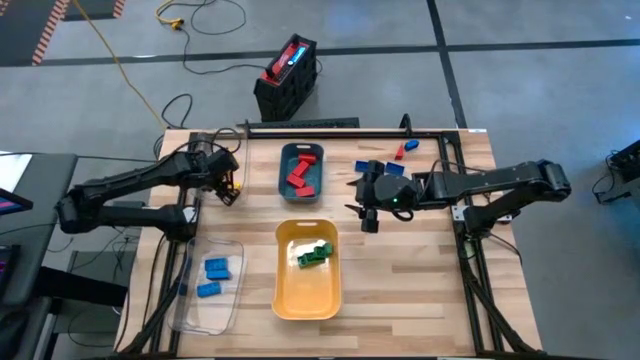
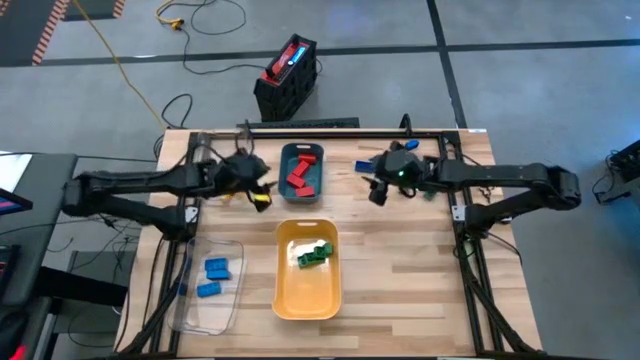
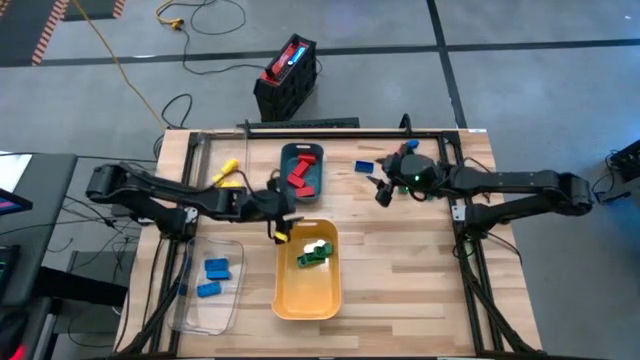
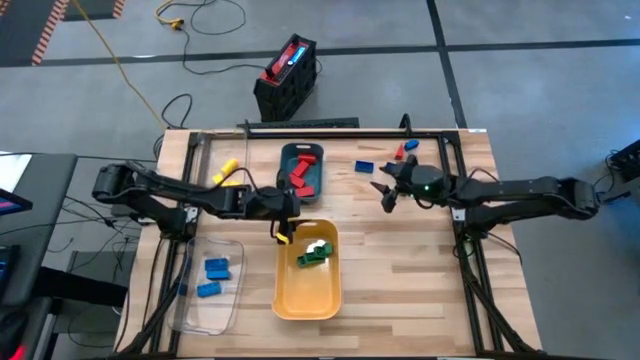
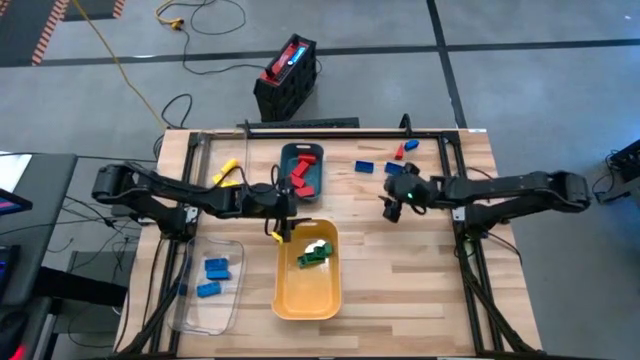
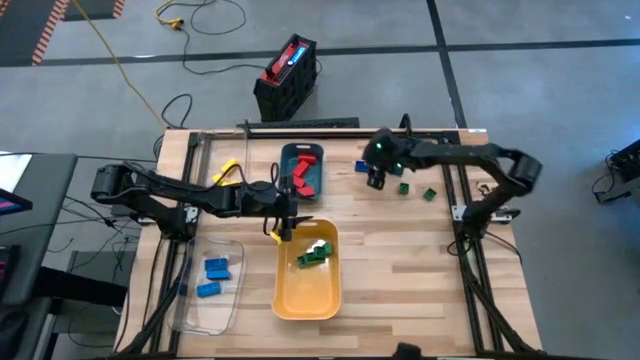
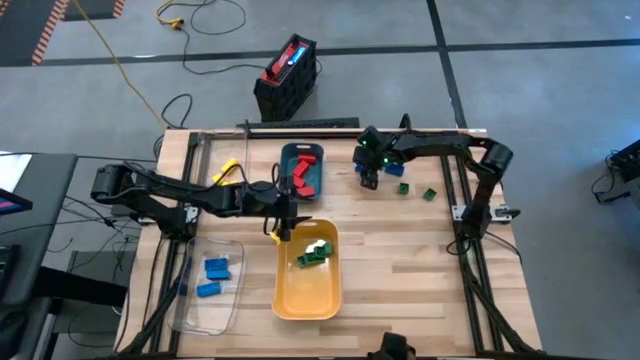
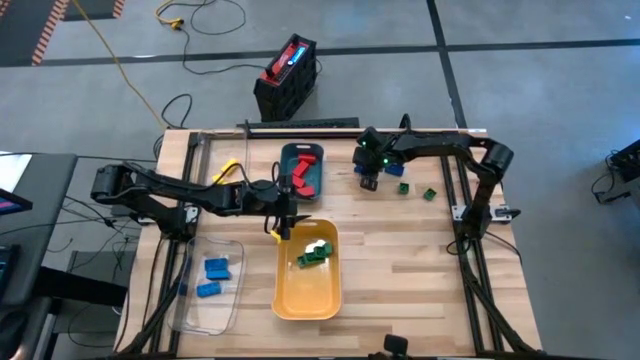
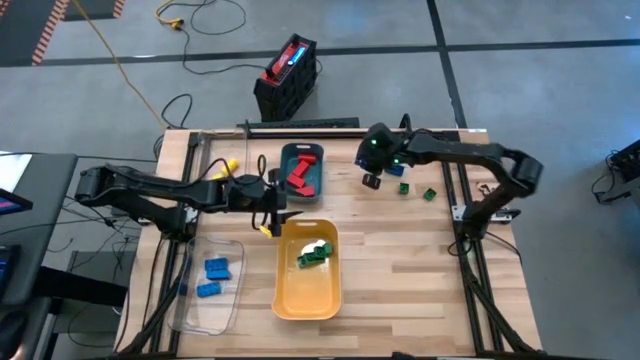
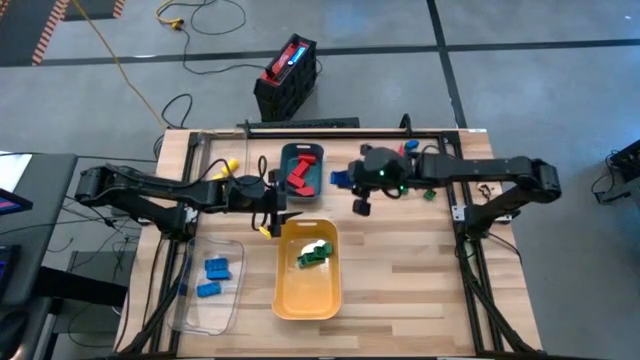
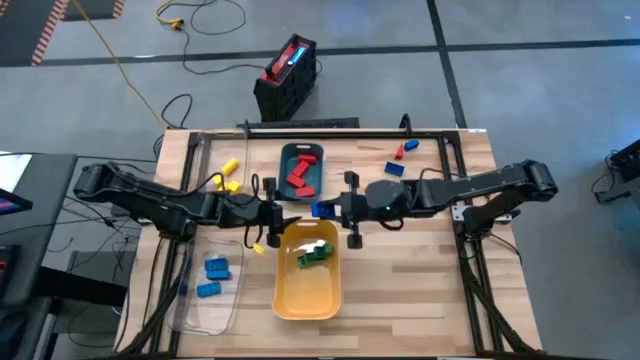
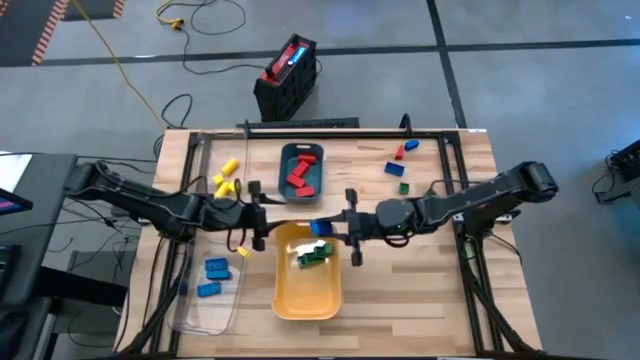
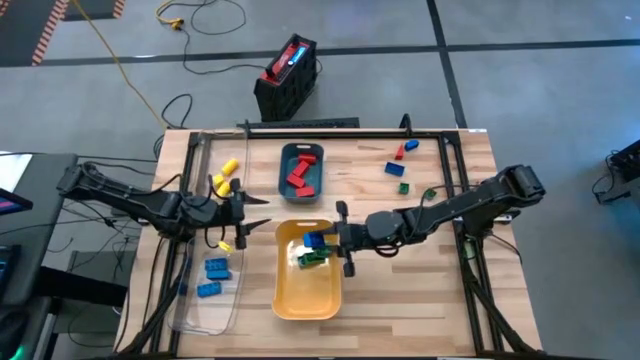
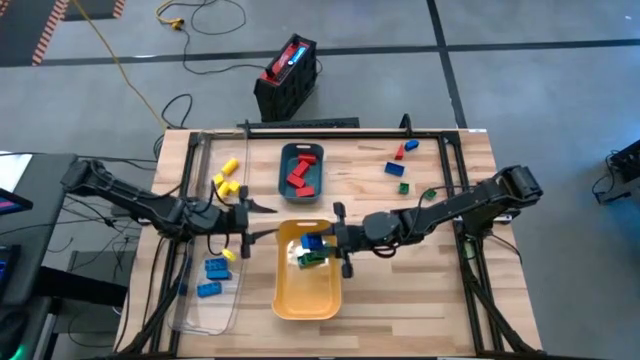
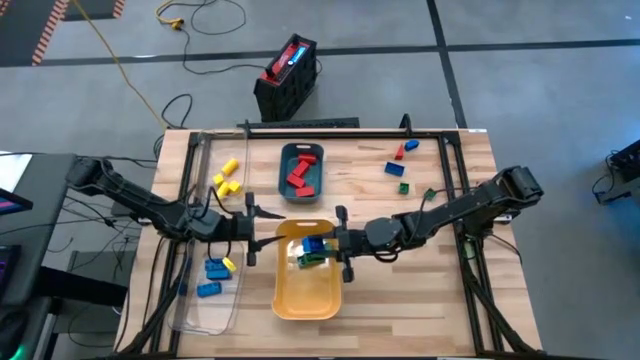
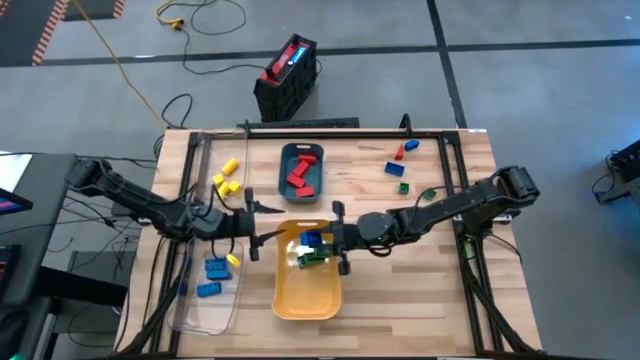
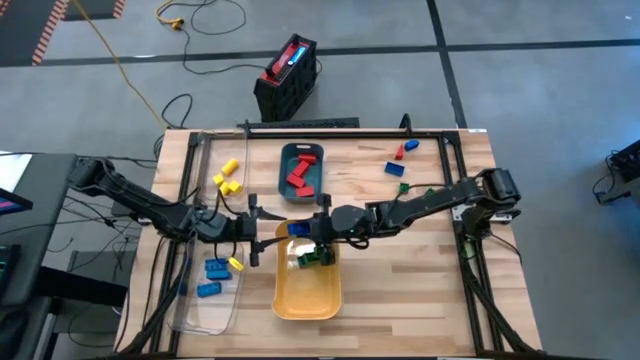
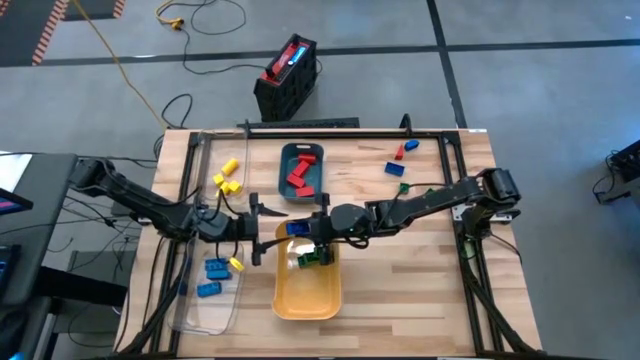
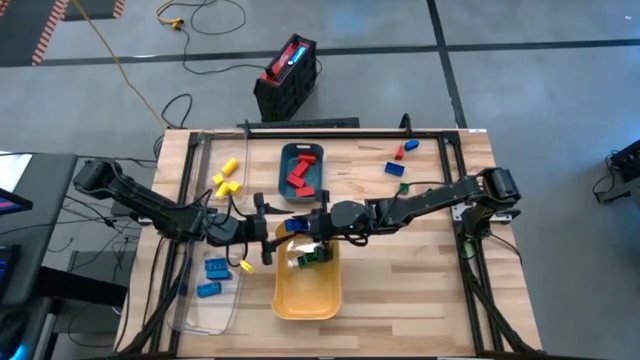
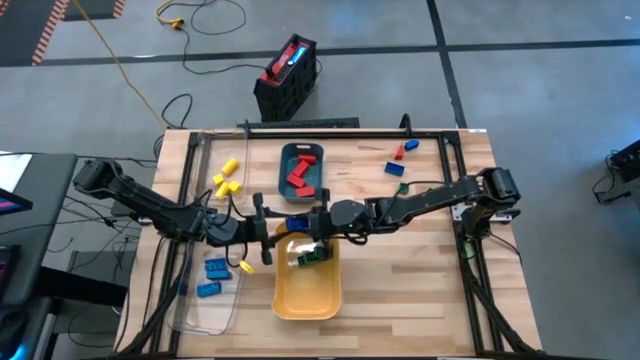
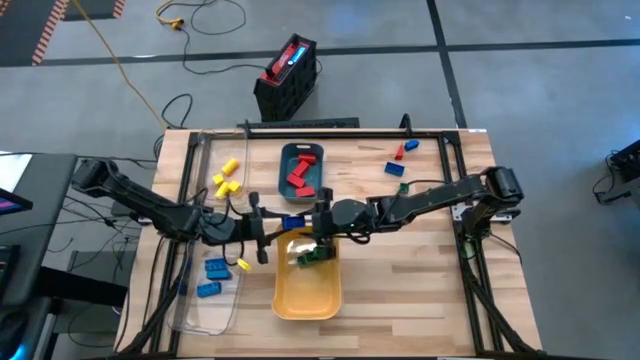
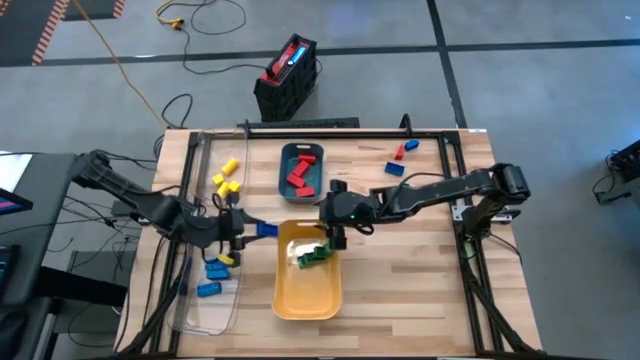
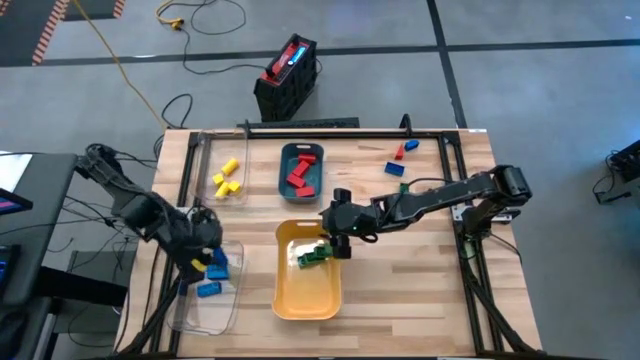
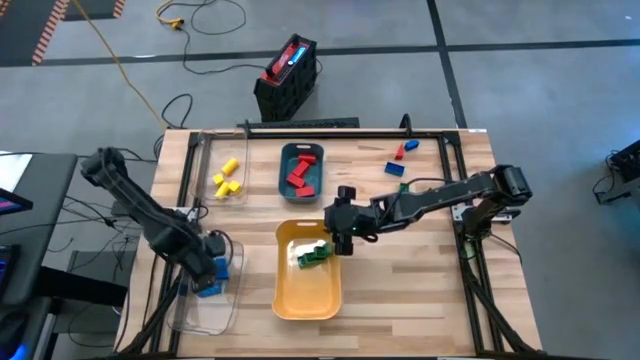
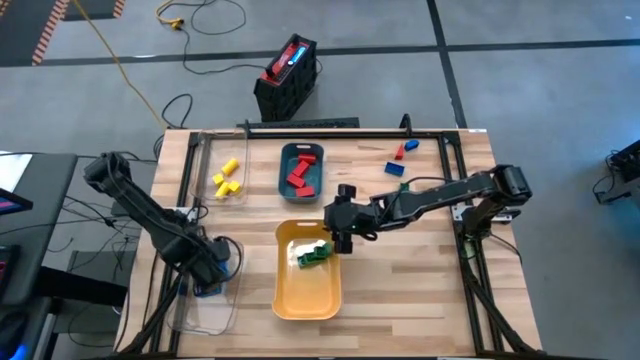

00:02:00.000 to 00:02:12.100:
Task: Sort blocks
Put the rectangular blue game piece into the bottom transparent bin

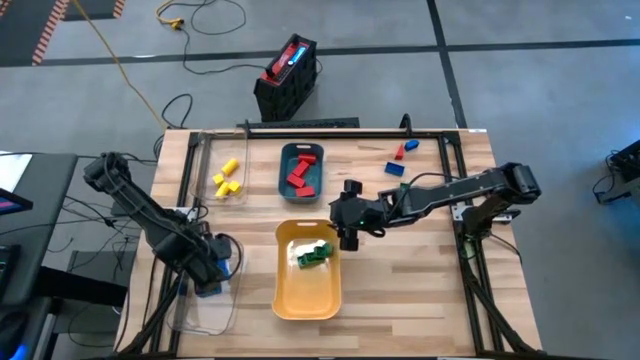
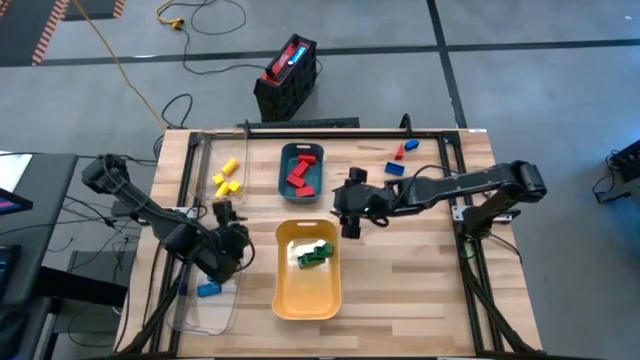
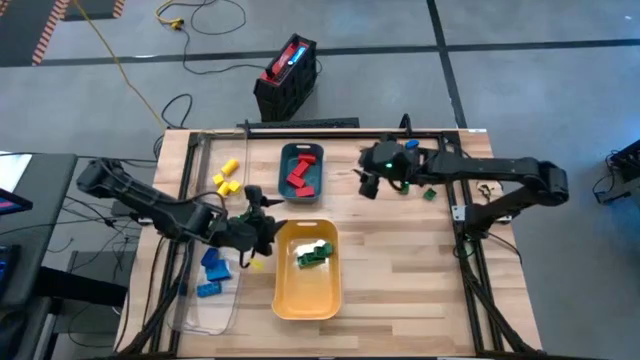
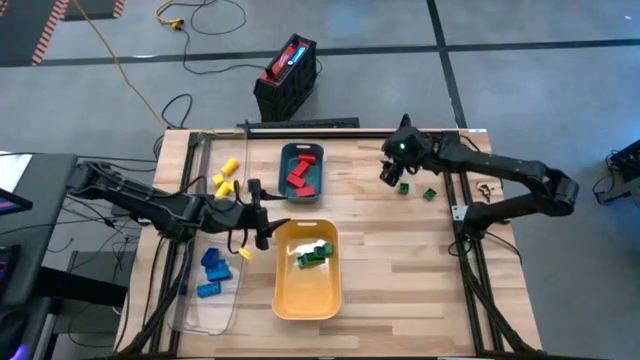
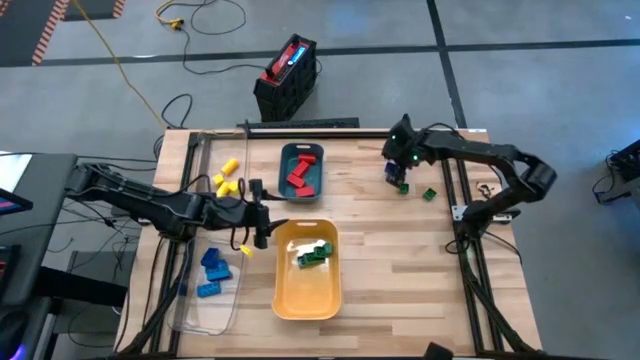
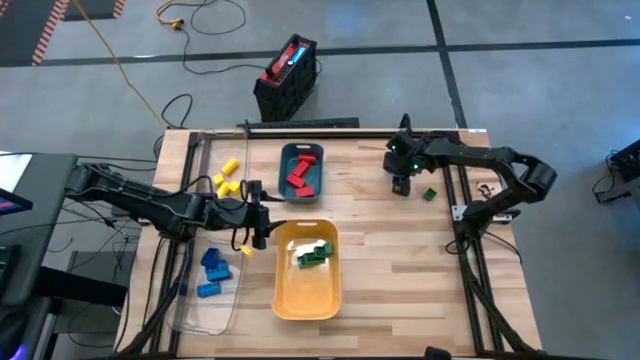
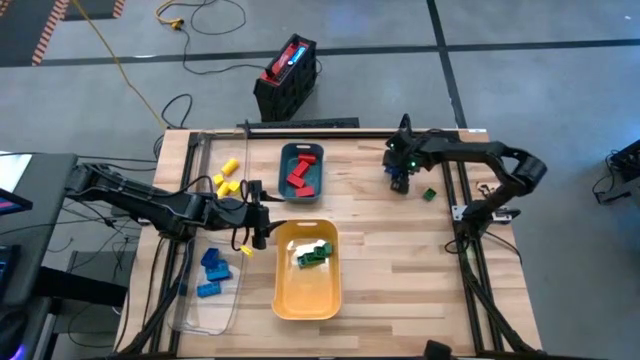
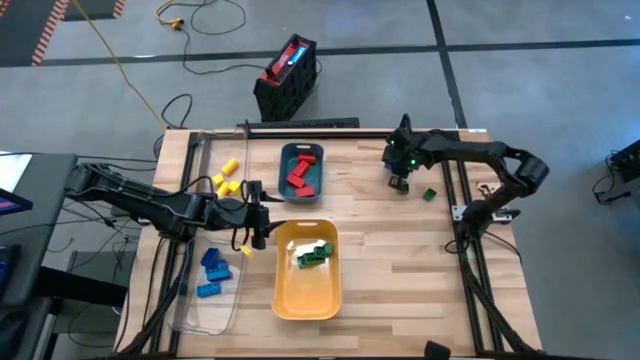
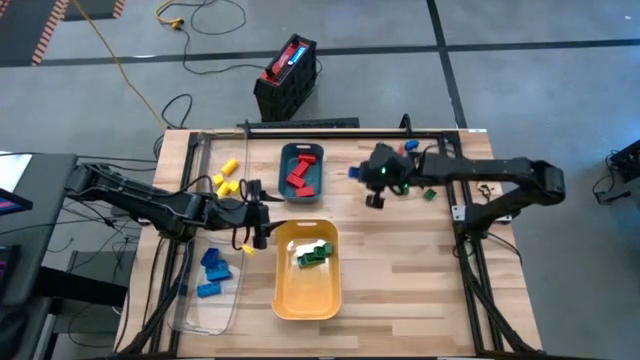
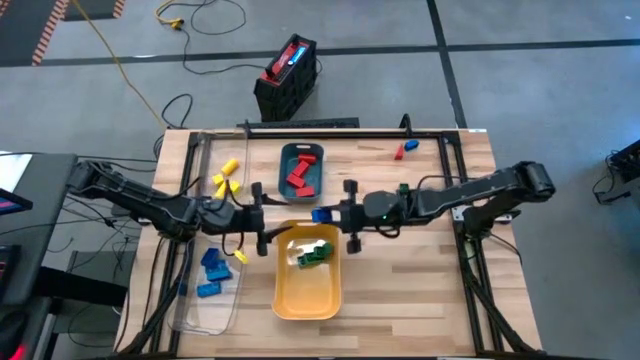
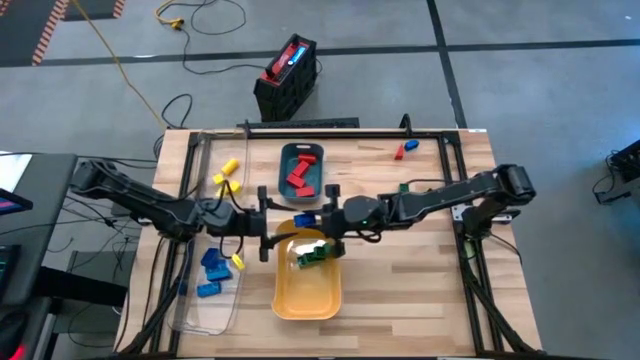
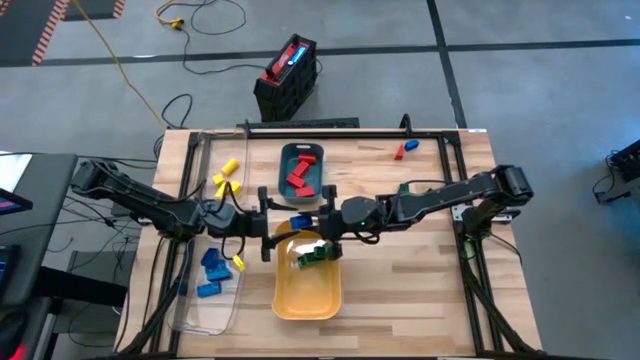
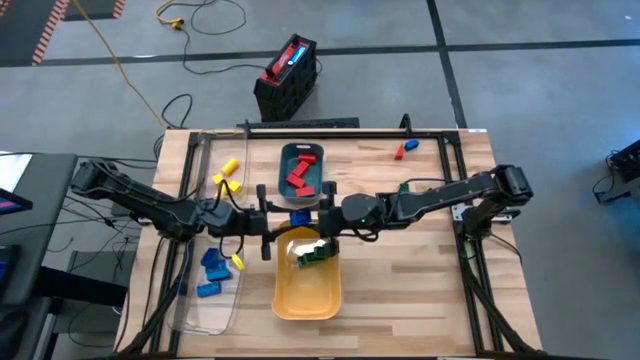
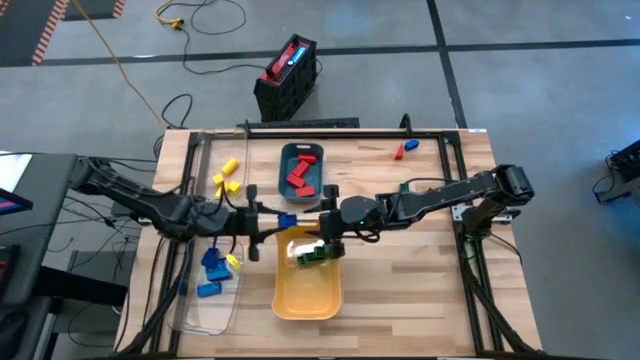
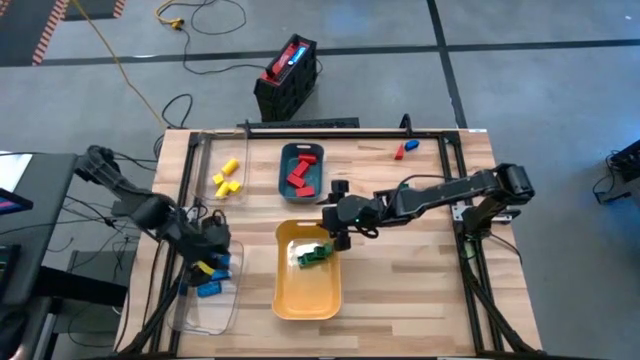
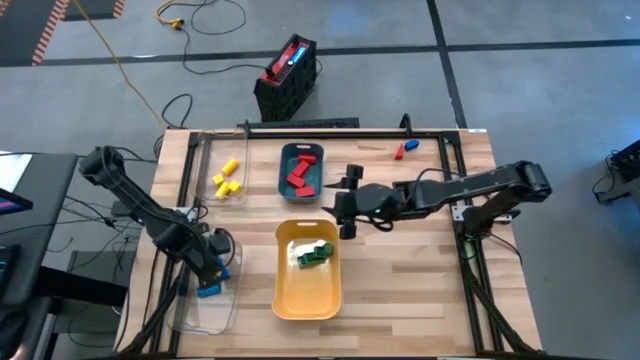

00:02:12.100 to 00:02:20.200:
Put the rectangular blue game piece into the bottom transparent bin
